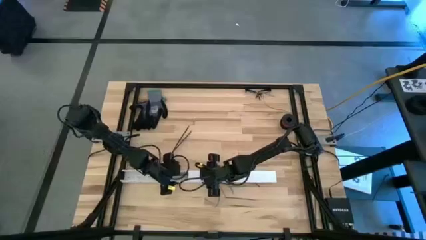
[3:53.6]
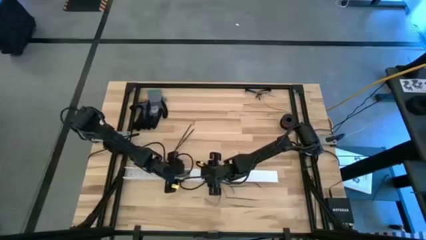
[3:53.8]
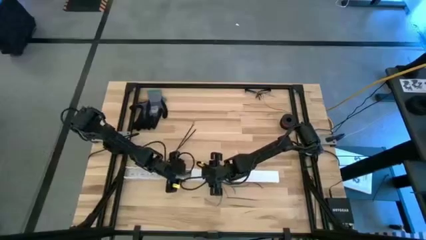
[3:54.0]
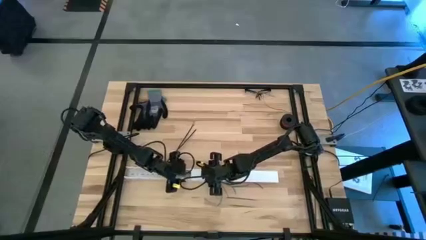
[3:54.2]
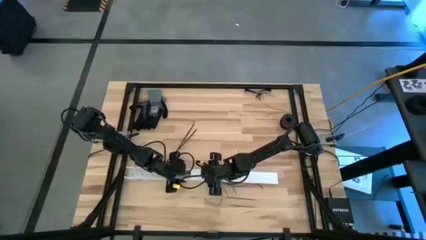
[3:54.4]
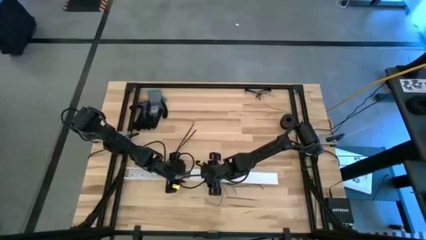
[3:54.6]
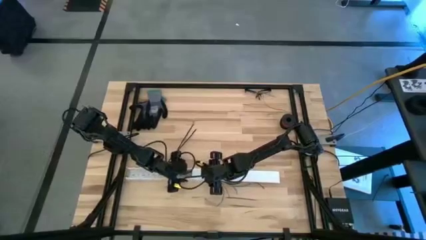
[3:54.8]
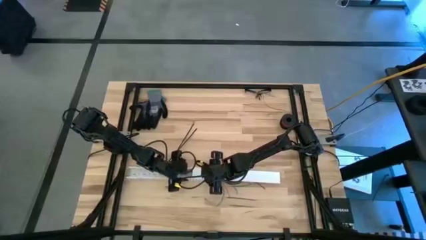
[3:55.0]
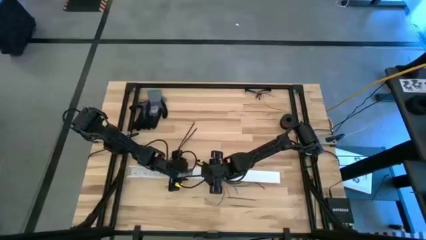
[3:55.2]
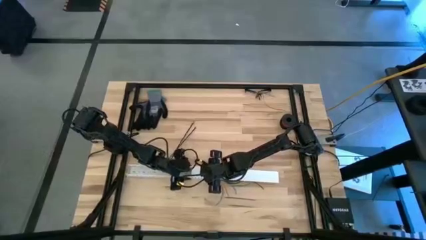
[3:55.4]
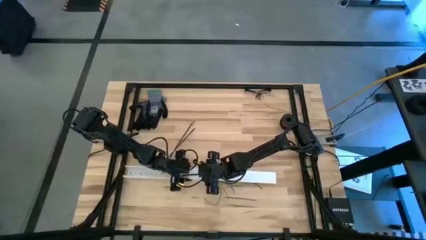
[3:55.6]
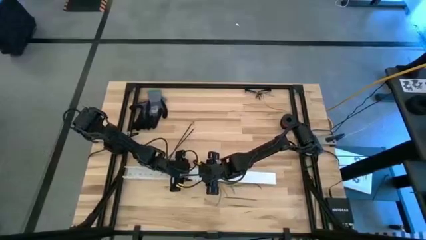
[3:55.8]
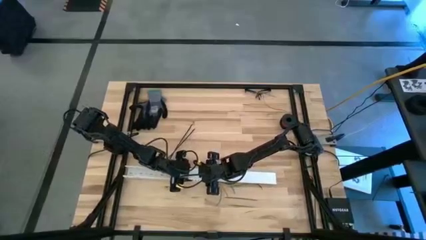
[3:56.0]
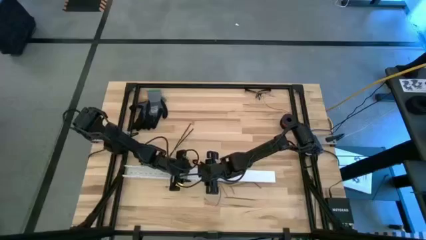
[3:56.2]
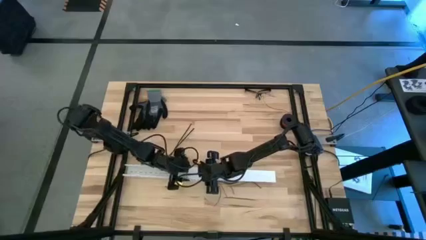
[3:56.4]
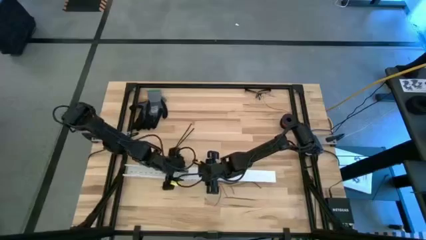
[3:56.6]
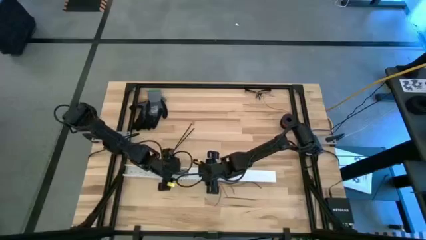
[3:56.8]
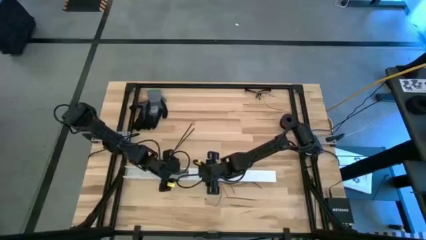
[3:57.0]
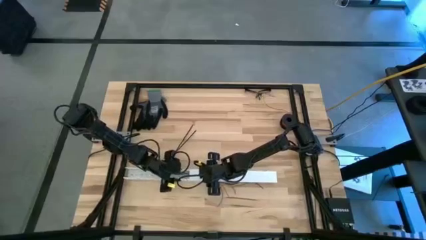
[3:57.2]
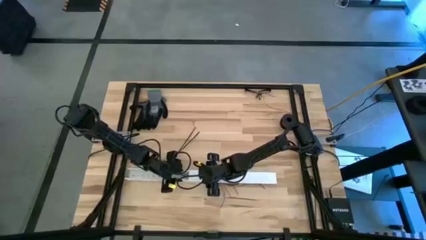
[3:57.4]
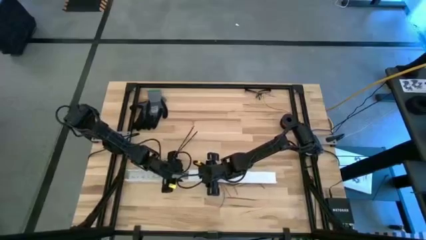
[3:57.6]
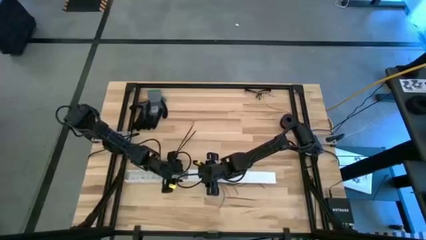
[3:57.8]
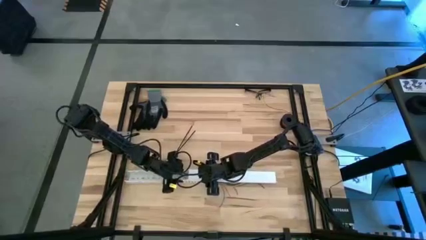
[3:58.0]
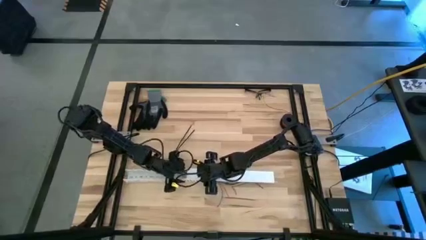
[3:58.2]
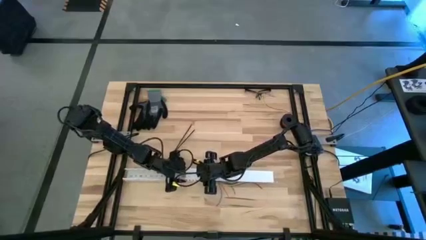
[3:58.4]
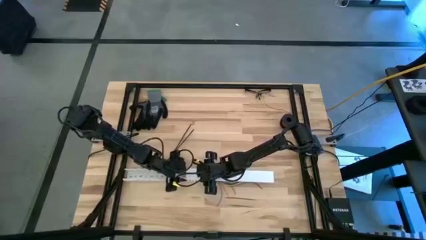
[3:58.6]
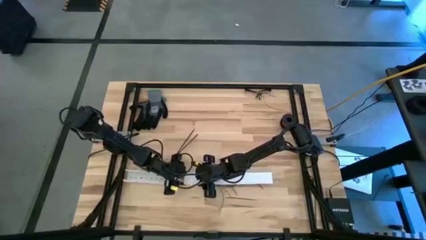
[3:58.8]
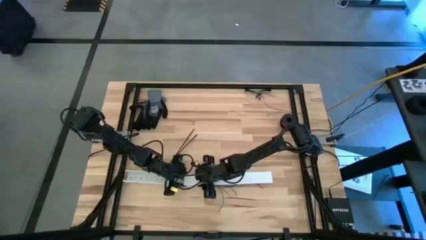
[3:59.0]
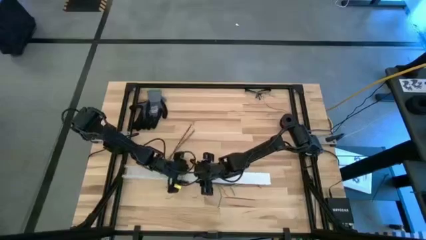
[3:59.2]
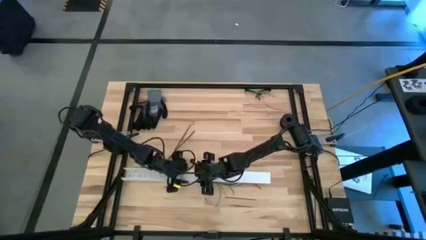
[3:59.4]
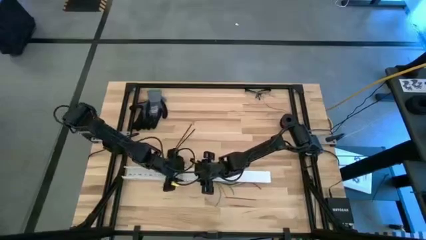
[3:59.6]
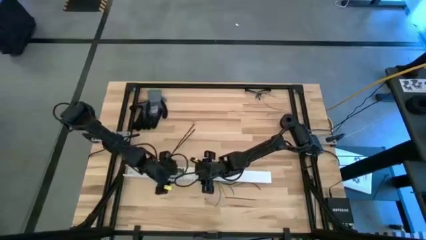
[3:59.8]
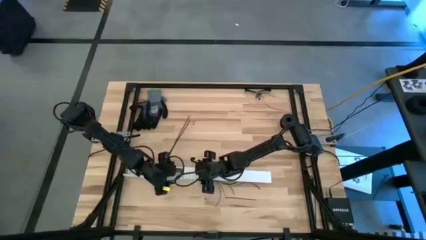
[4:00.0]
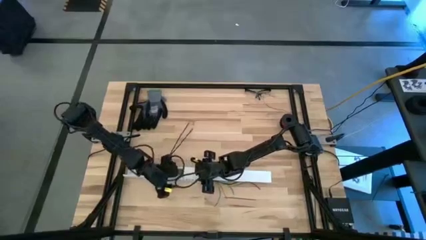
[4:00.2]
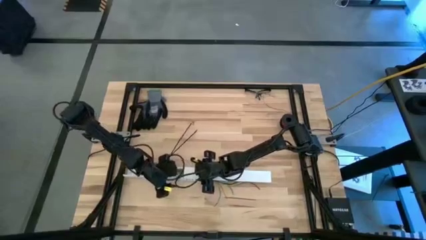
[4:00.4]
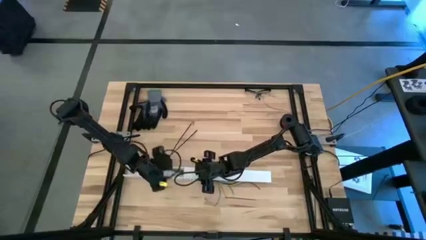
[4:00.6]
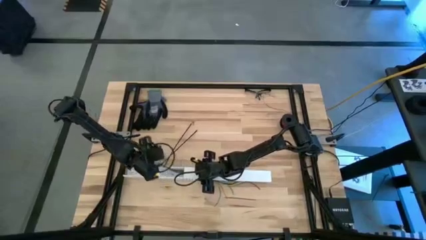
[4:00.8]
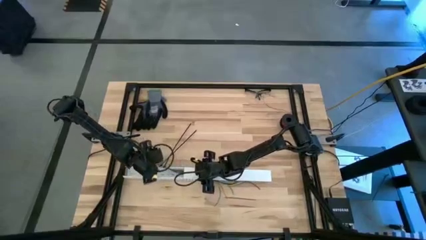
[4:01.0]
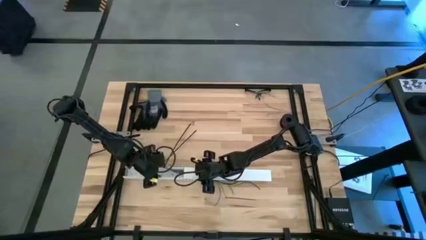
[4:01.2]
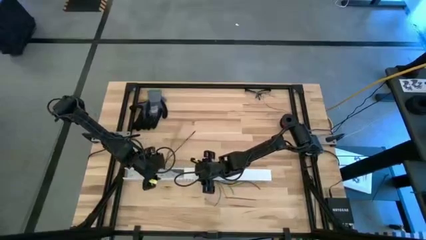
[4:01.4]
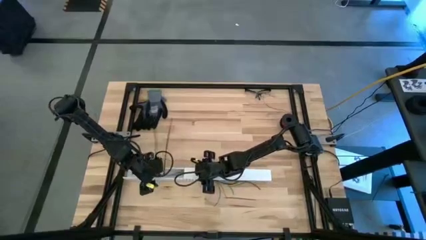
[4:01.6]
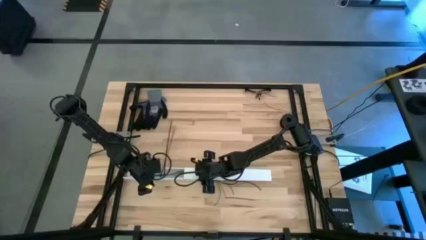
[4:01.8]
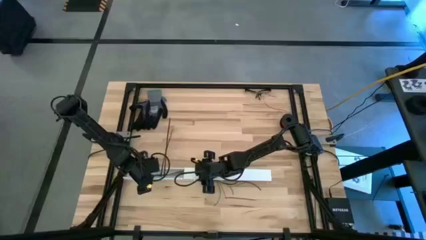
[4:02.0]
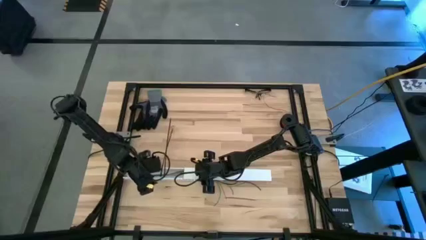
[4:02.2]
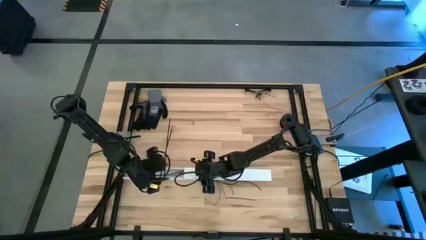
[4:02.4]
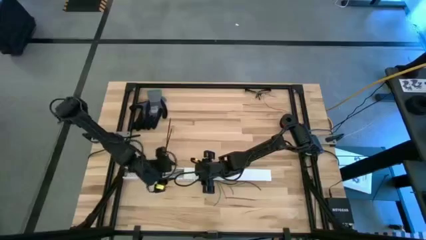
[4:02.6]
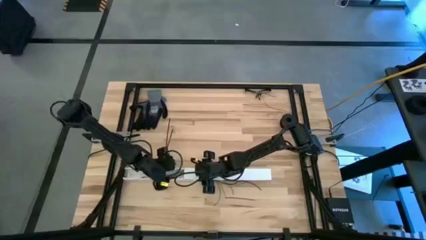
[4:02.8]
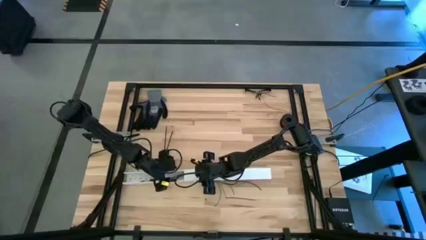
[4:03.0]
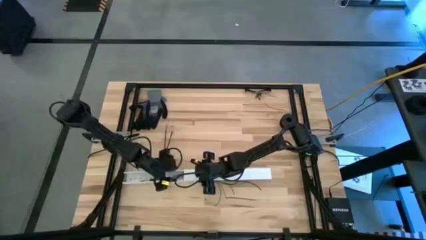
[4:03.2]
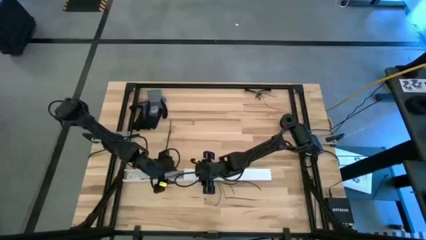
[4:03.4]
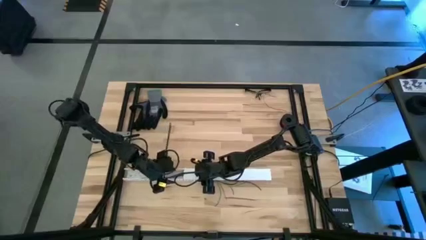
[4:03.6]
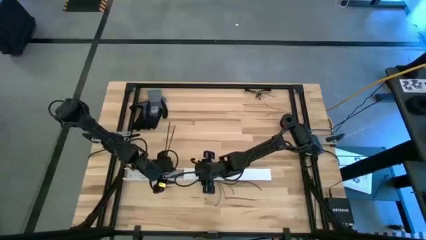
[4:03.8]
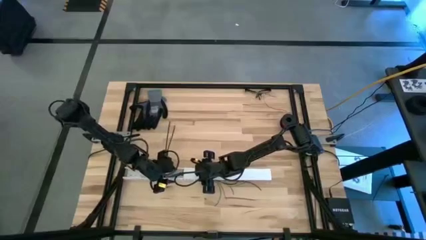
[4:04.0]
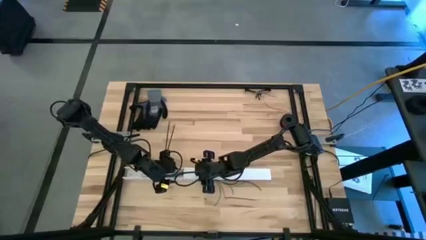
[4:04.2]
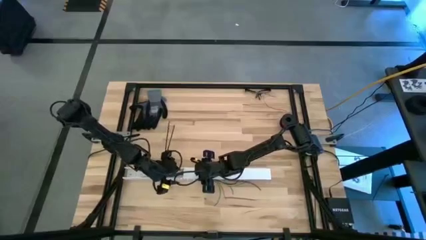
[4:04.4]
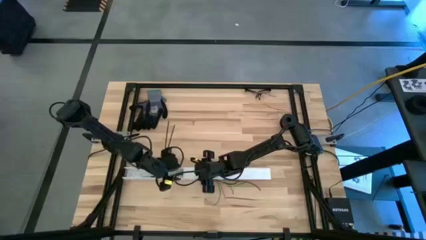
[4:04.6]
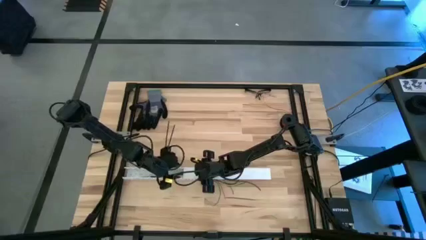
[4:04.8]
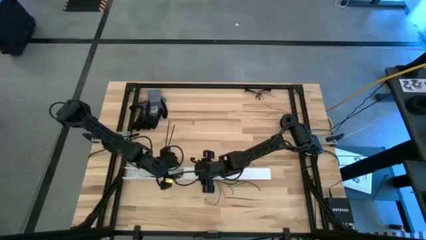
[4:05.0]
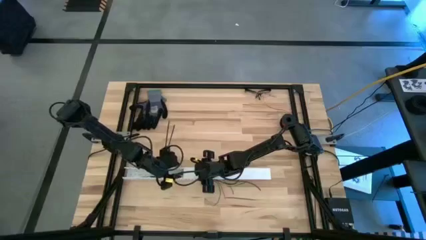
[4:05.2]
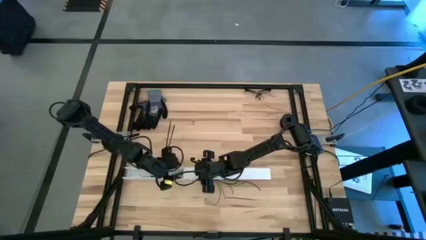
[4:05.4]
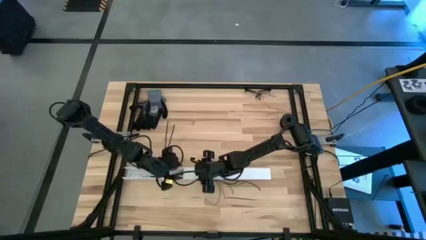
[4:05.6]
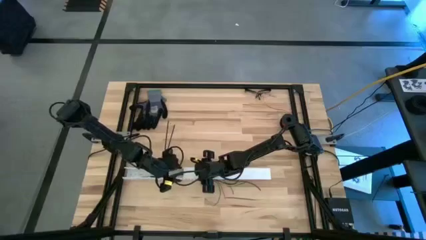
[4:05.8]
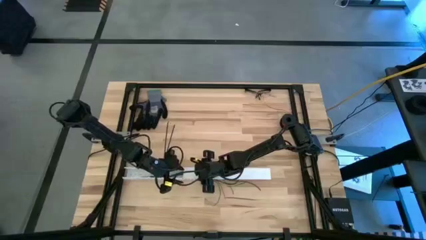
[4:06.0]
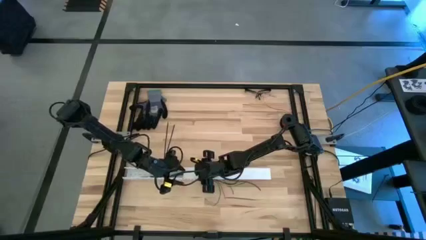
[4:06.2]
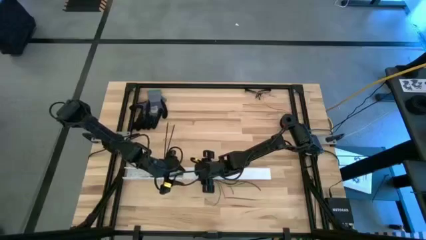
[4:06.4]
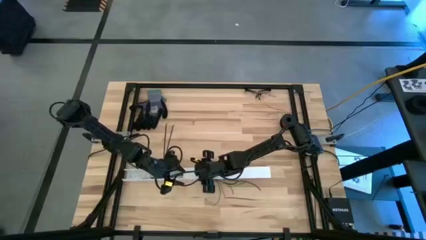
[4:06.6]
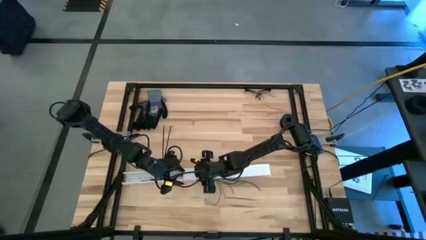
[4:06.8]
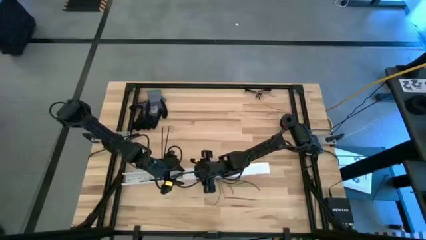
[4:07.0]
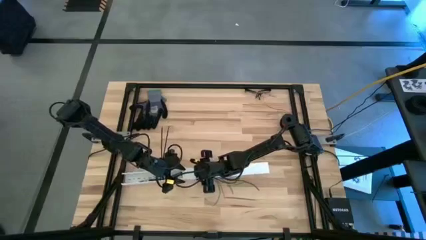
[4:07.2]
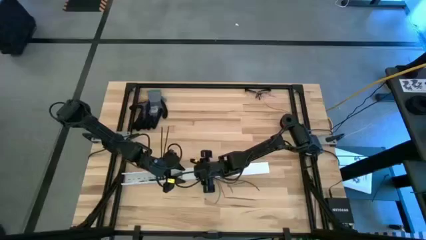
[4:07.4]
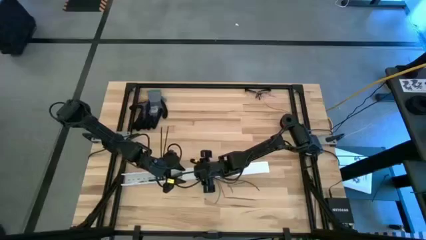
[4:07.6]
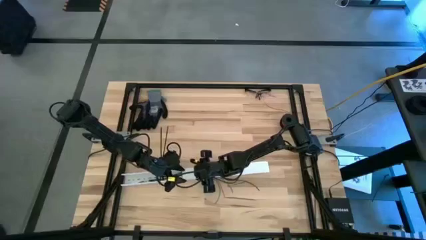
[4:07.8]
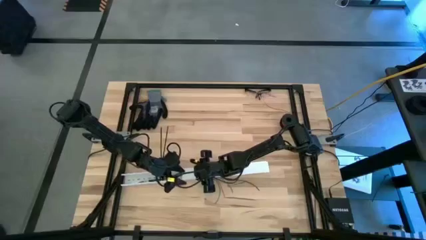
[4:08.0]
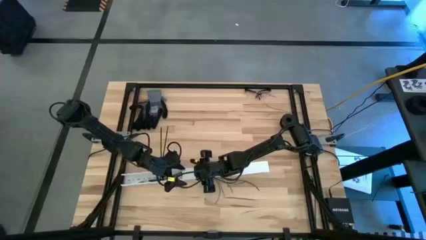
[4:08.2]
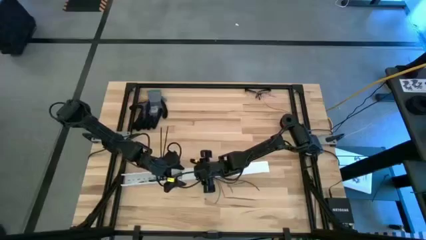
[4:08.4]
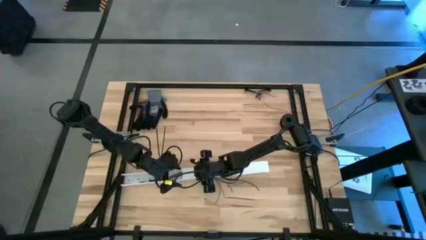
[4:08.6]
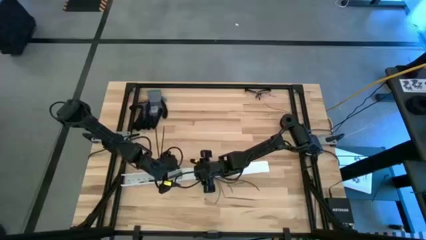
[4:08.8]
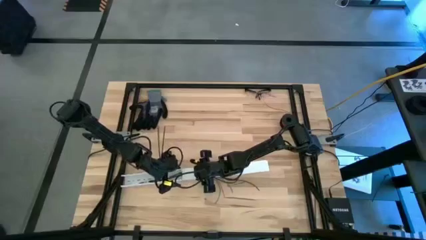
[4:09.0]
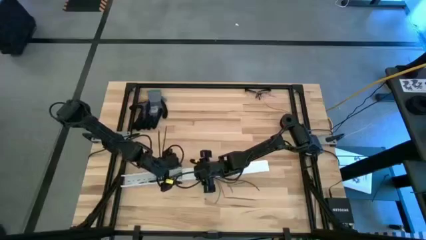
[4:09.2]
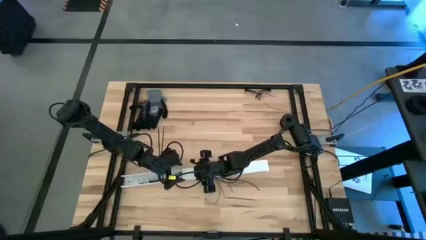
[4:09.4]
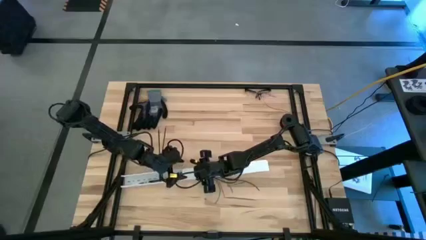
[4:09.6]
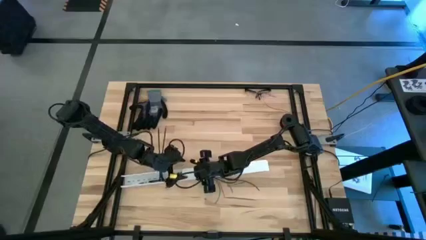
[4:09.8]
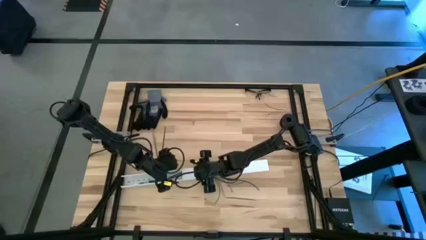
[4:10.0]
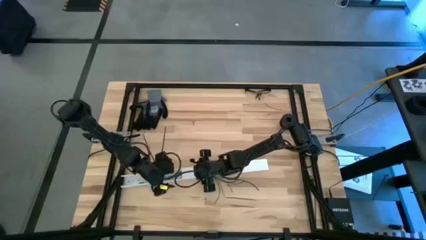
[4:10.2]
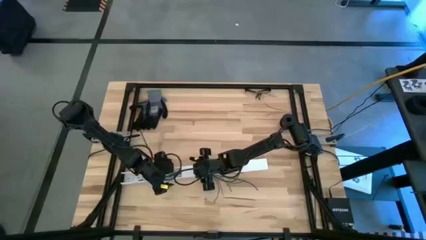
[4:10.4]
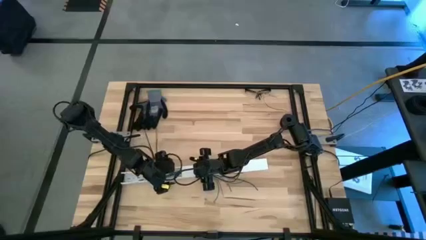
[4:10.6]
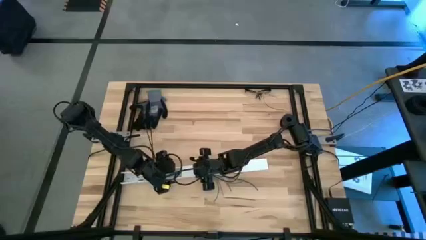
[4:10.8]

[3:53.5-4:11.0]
Task: Ziptie cables
Close the white cable duct
